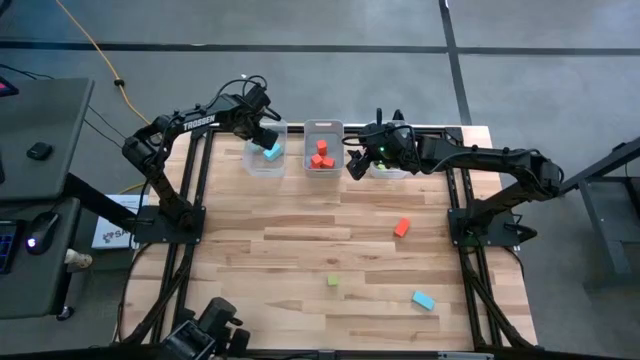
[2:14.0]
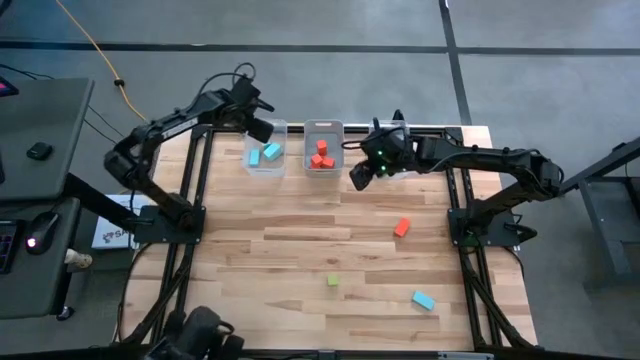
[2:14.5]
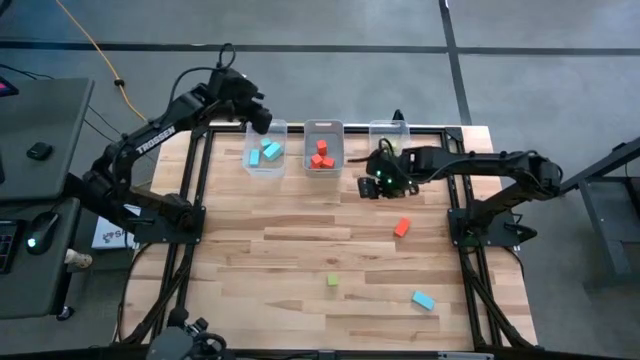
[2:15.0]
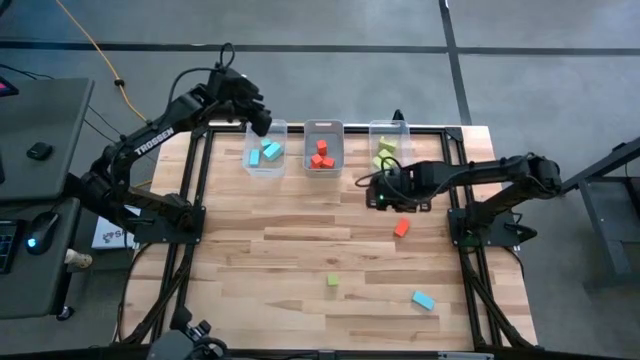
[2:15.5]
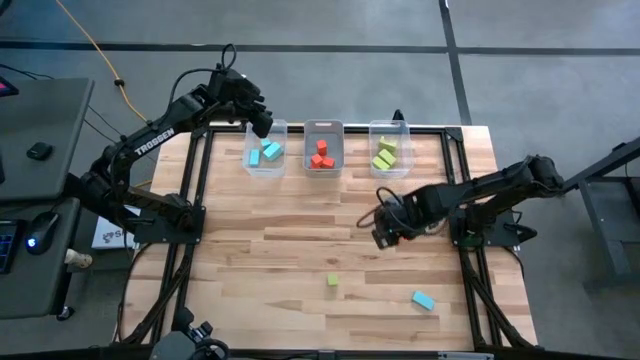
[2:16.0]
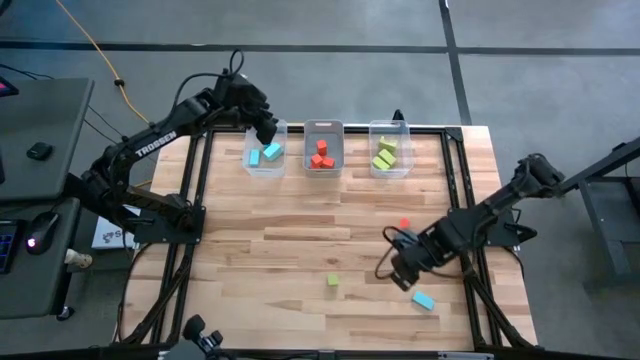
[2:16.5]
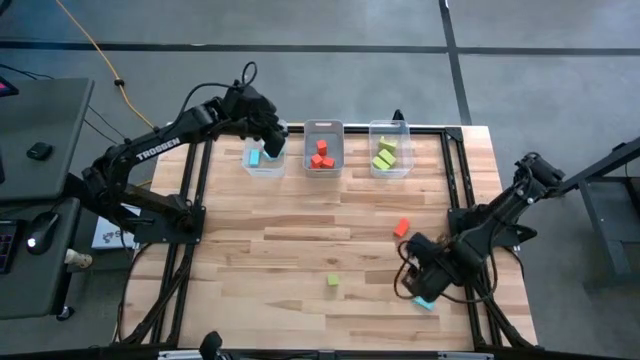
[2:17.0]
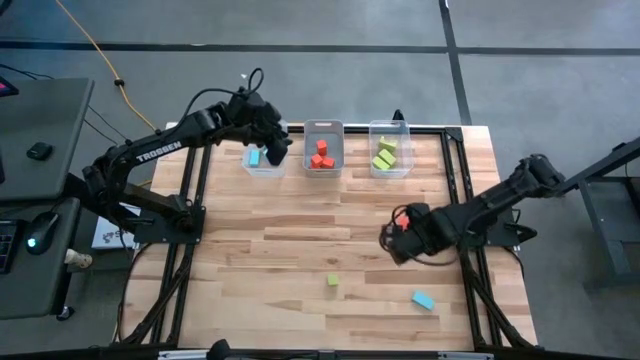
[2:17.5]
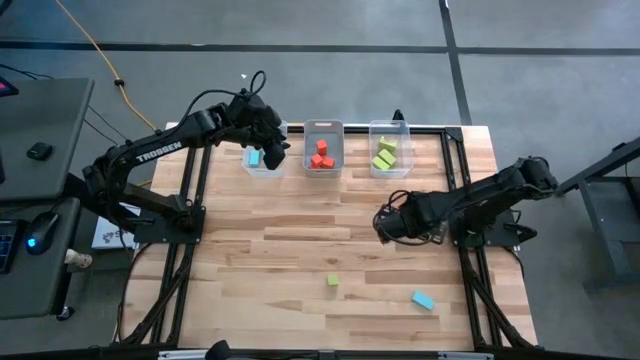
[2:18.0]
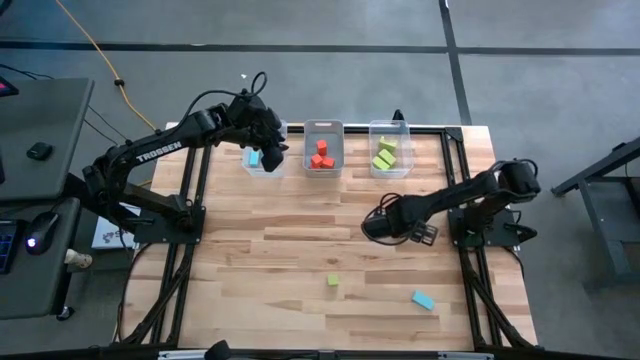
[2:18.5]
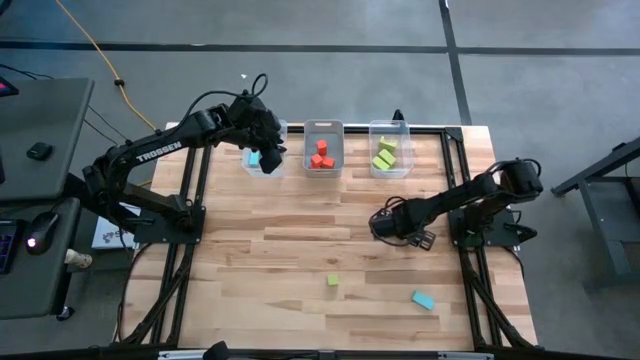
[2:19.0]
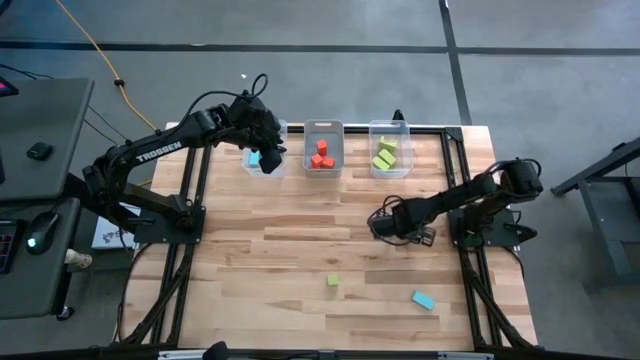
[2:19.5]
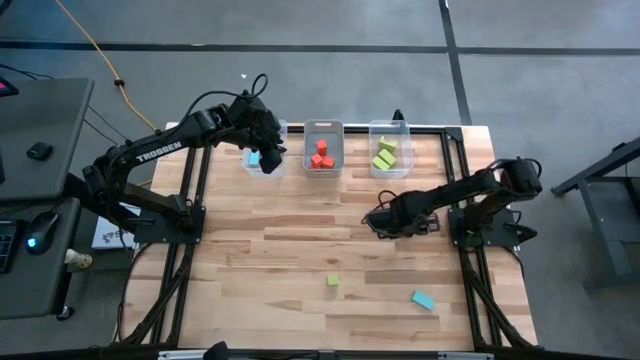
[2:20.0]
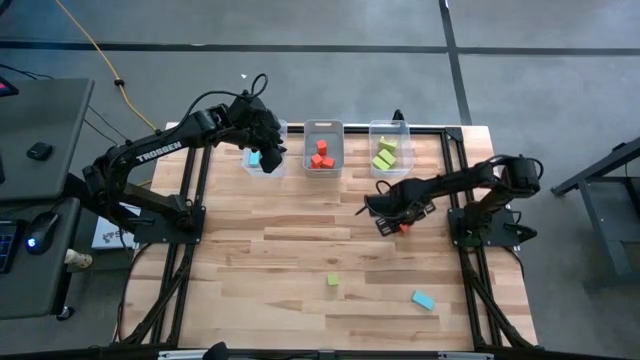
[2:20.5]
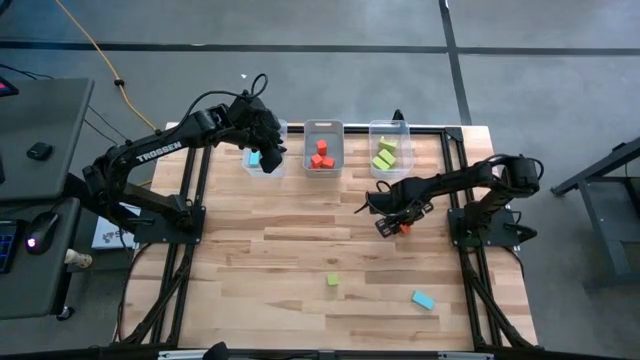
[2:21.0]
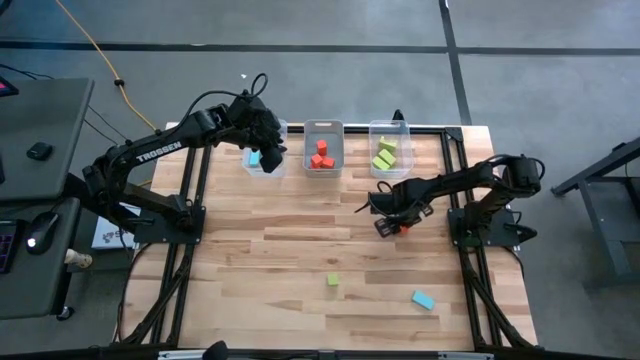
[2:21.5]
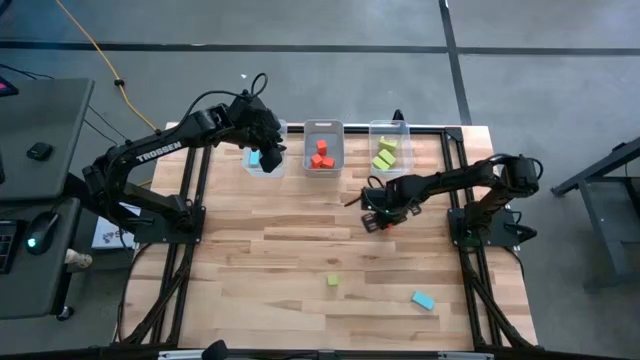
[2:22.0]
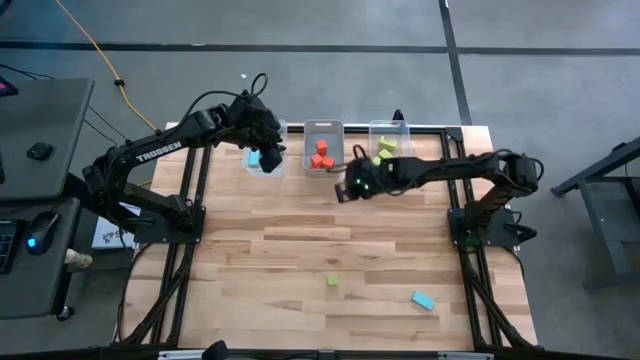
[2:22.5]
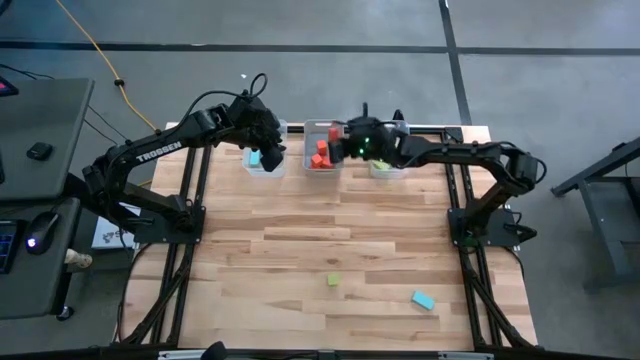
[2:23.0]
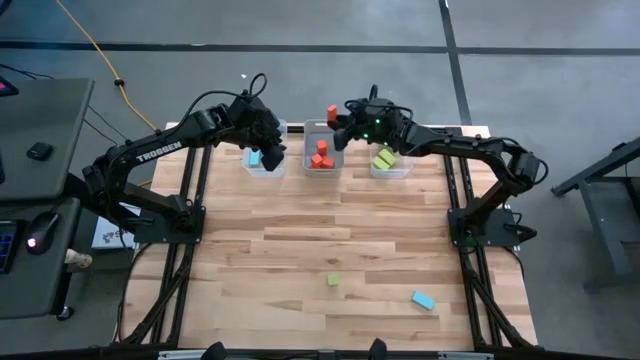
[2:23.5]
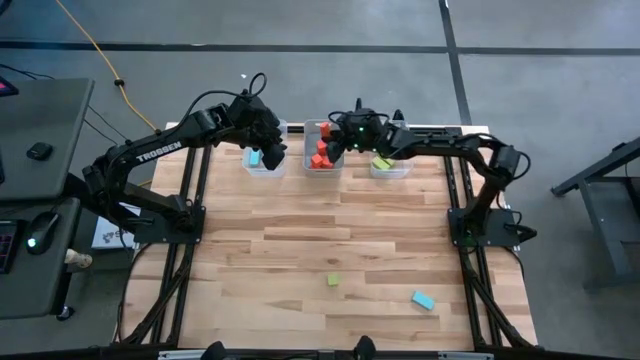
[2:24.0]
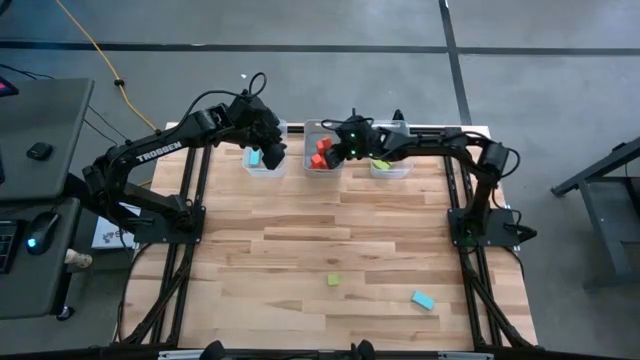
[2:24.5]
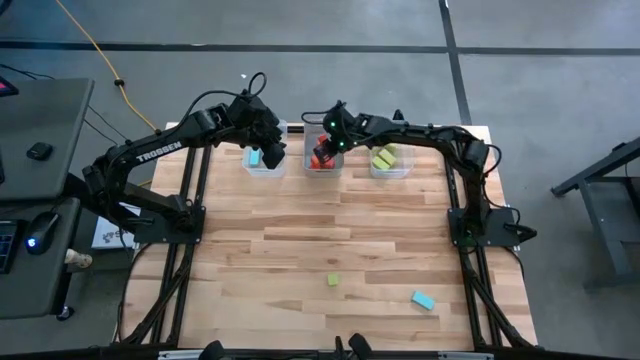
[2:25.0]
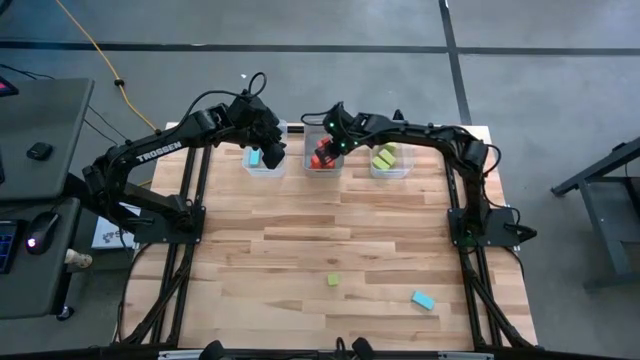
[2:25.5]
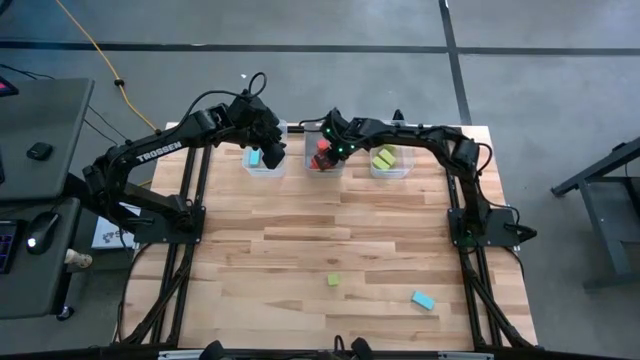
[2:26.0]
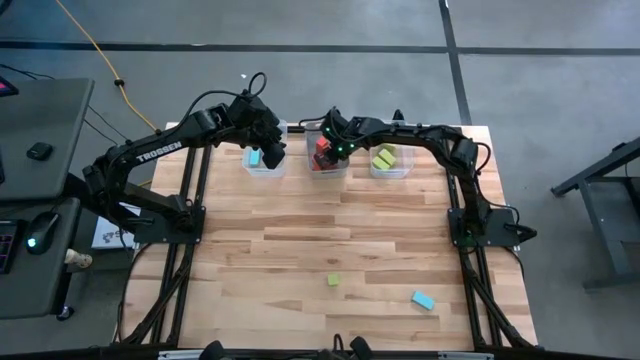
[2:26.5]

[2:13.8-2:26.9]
Task: Sort & place blocks by color
Put the small orange rectangular block into the gray bin

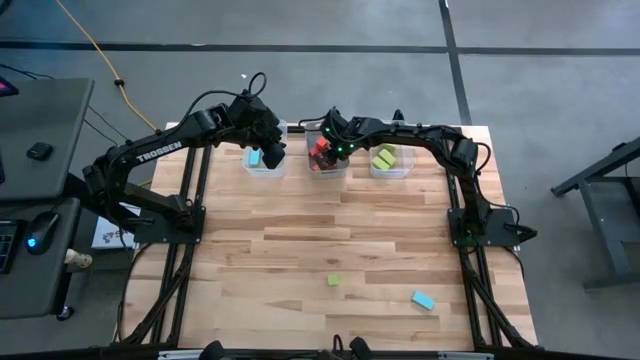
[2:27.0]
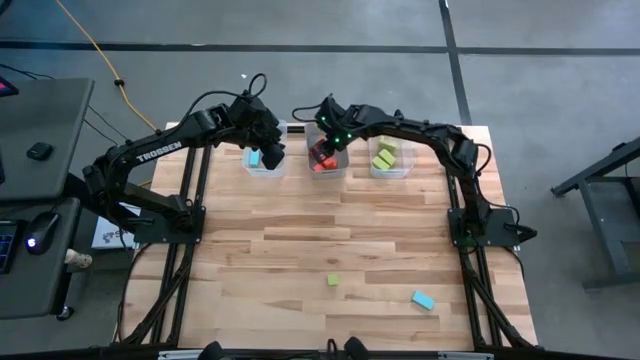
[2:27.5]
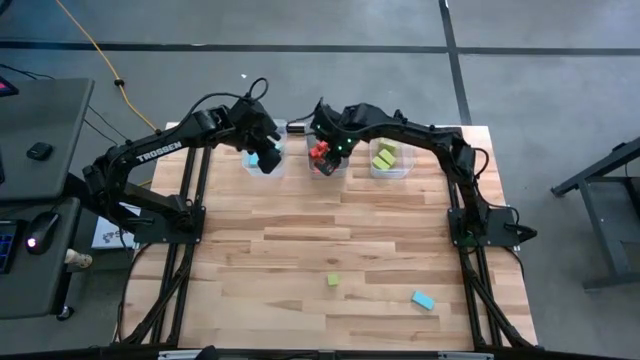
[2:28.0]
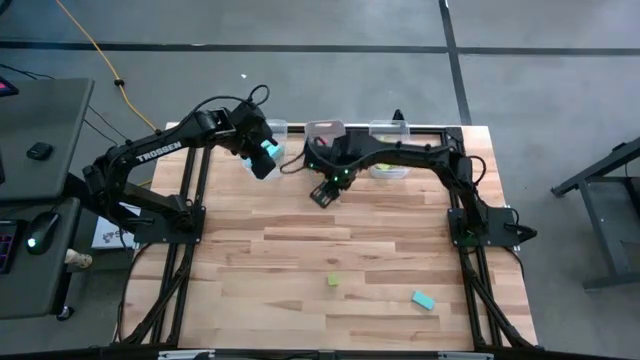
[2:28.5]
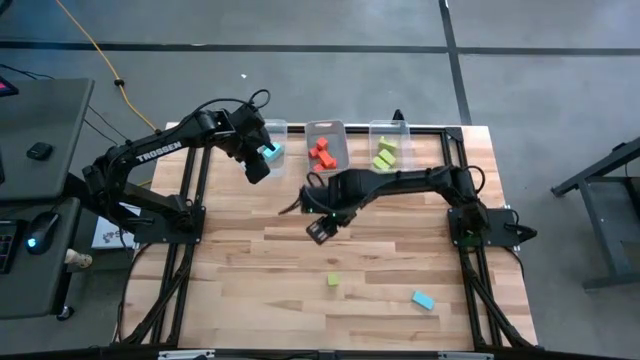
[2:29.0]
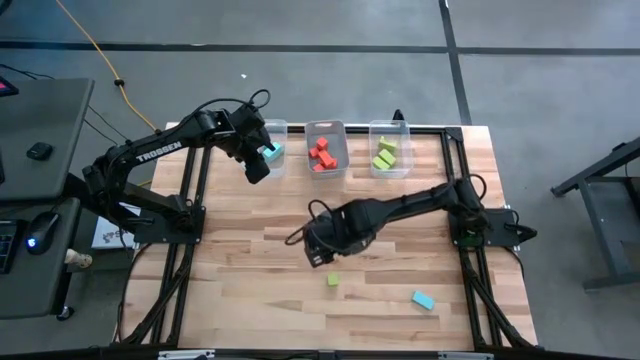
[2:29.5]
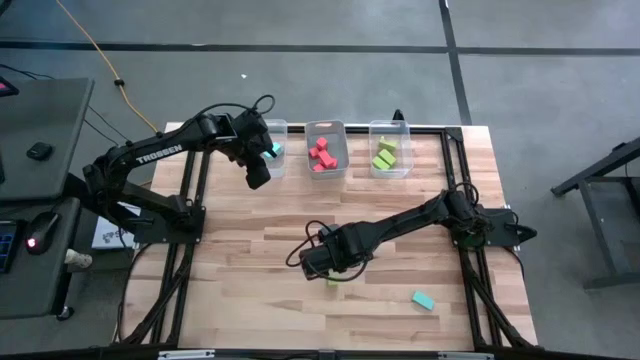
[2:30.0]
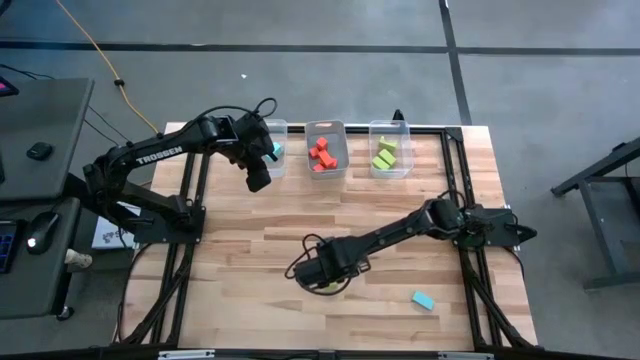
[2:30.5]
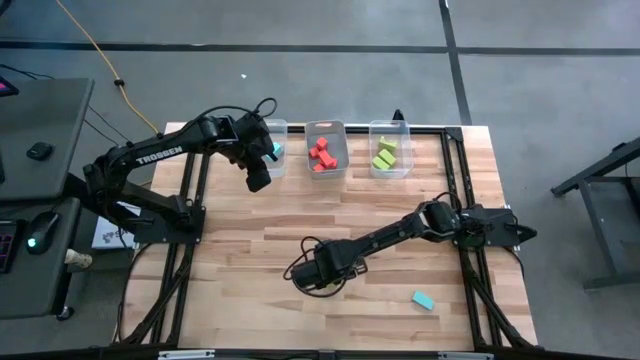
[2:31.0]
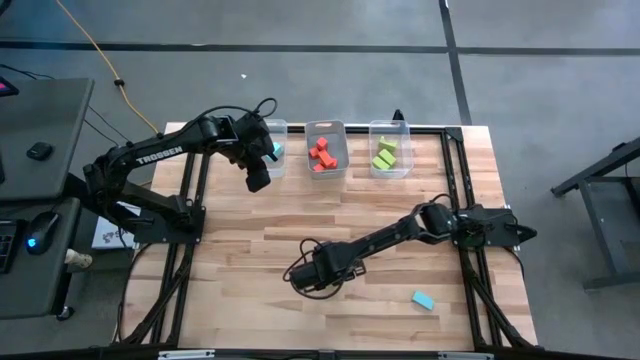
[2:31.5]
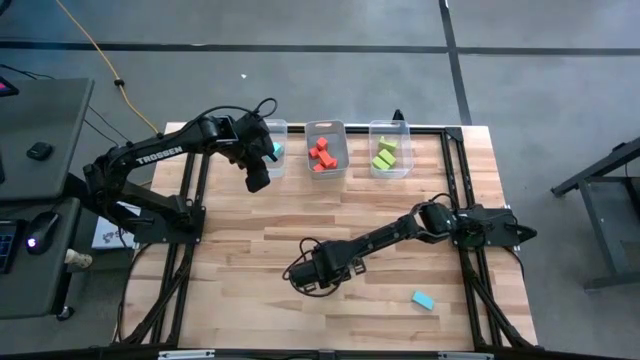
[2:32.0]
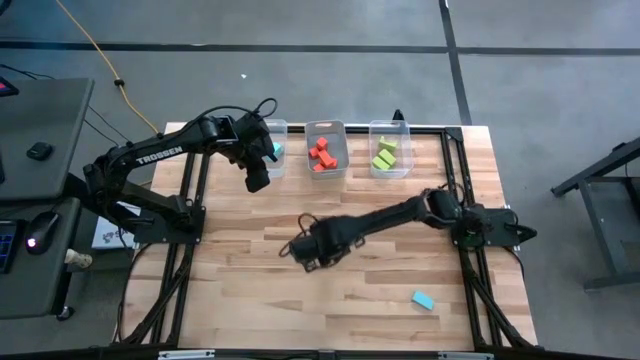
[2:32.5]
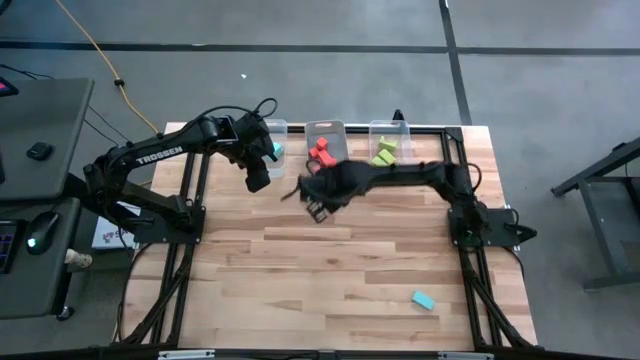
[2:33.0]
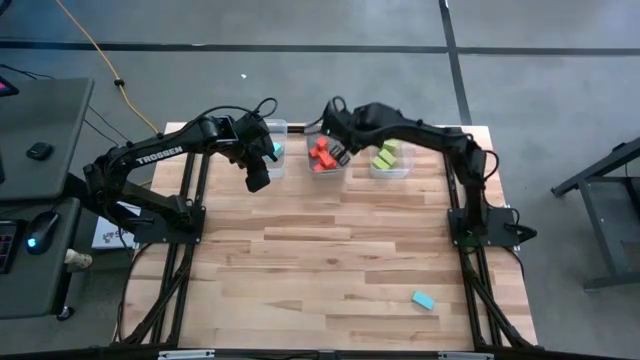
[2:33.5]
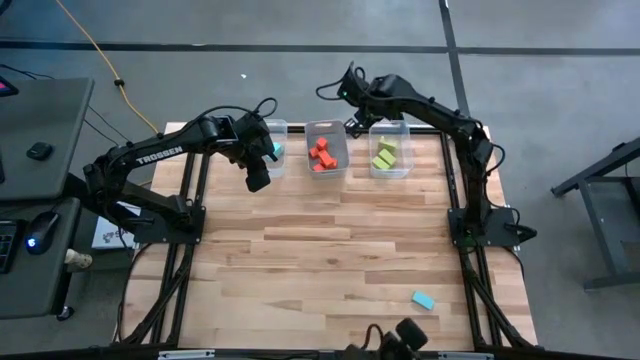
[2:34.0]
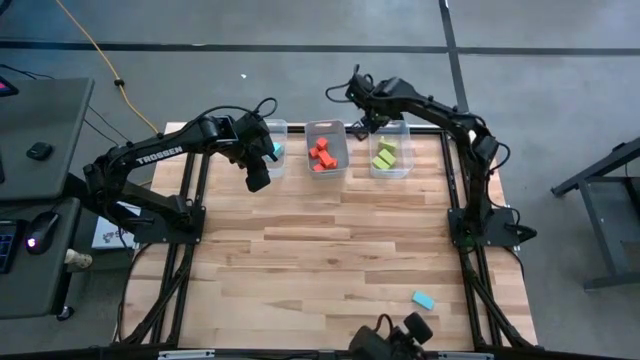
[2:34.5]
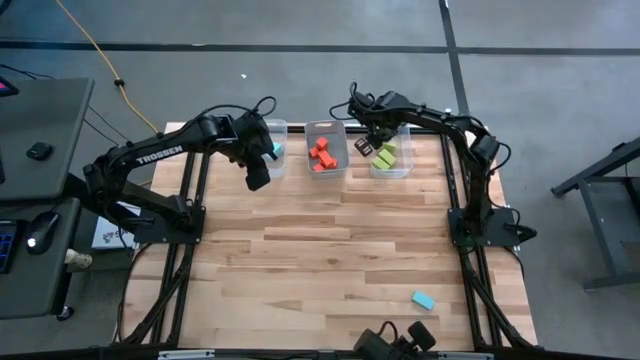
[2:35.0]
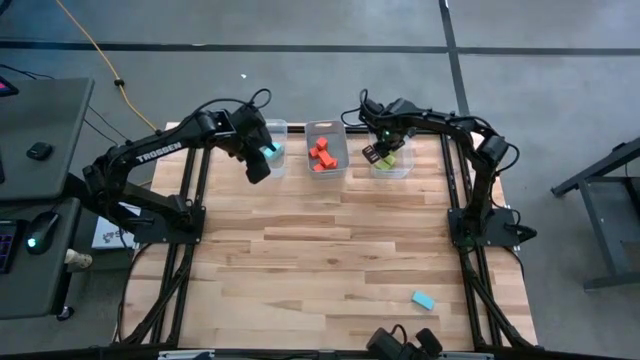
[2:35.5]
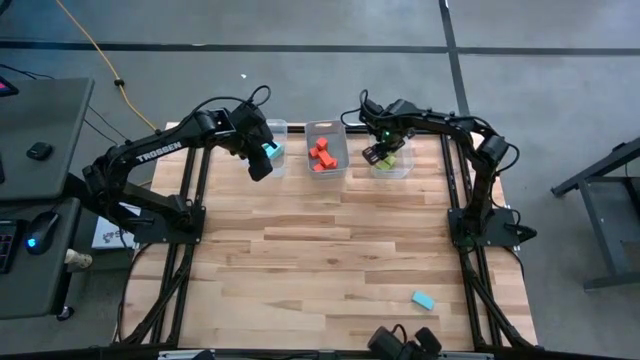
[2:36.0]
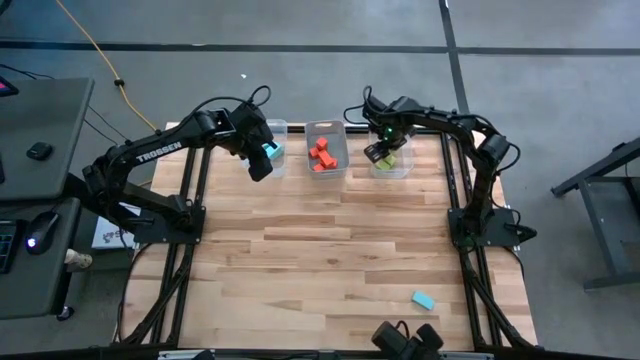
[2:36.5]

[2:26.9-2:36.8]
Put the green cube block into the right transparent bin
